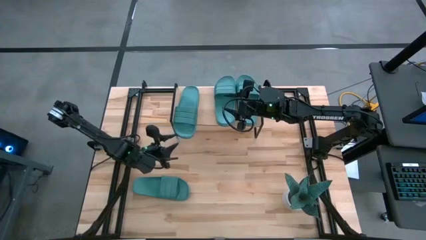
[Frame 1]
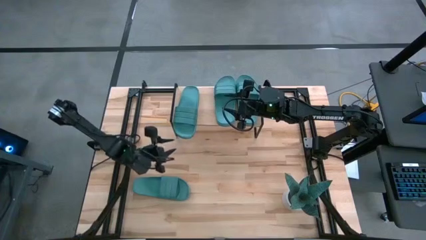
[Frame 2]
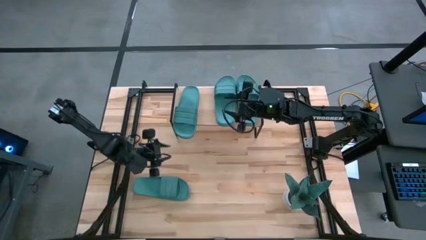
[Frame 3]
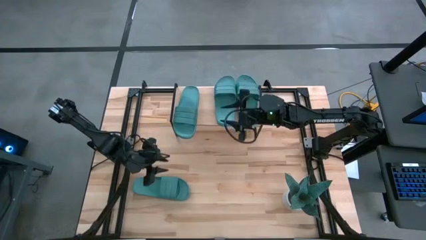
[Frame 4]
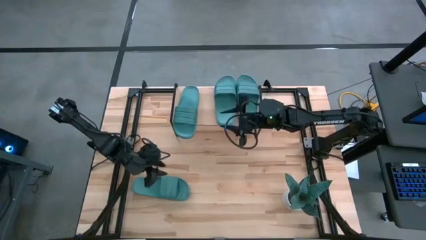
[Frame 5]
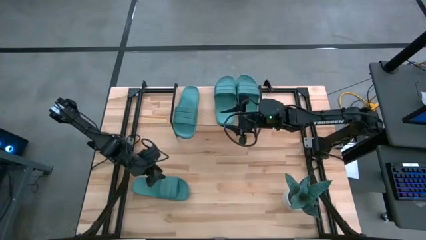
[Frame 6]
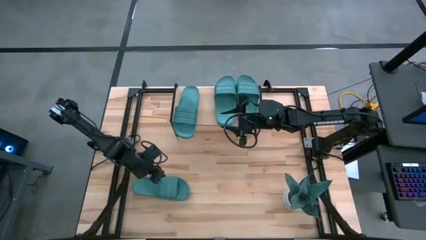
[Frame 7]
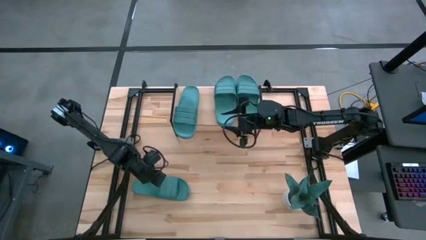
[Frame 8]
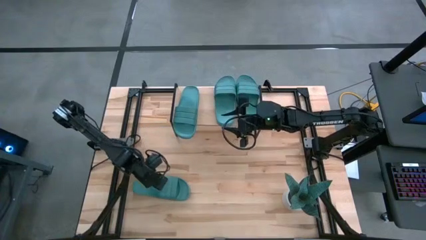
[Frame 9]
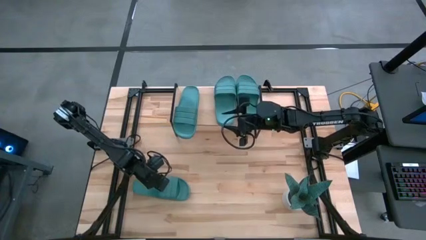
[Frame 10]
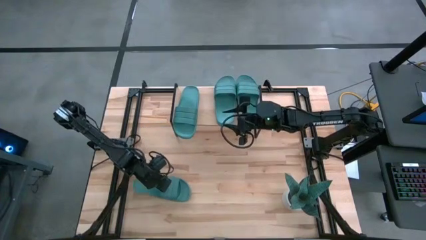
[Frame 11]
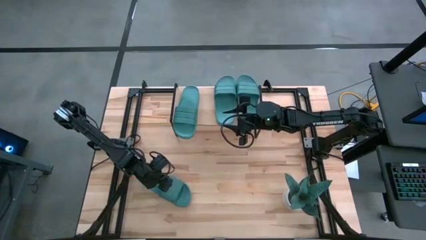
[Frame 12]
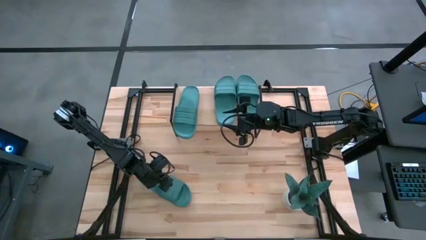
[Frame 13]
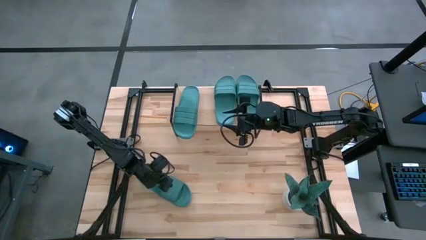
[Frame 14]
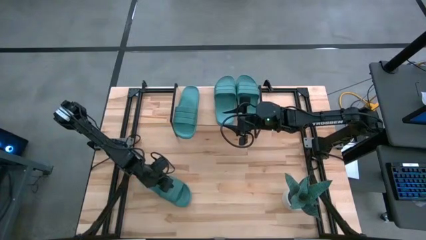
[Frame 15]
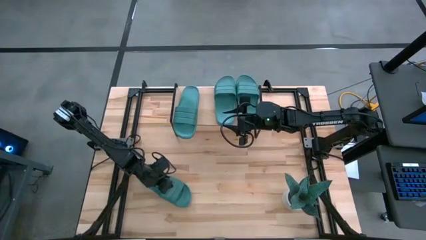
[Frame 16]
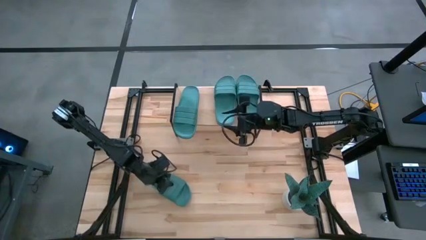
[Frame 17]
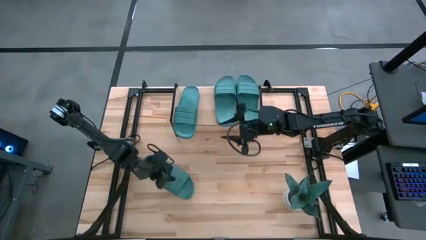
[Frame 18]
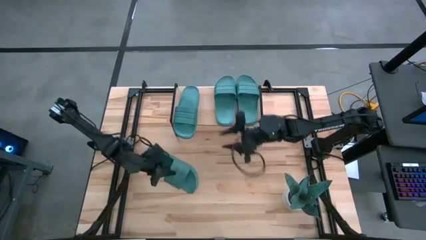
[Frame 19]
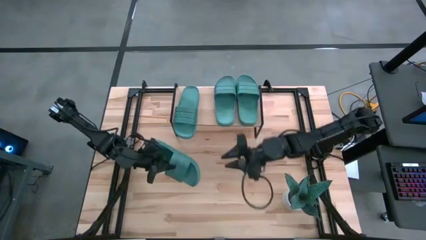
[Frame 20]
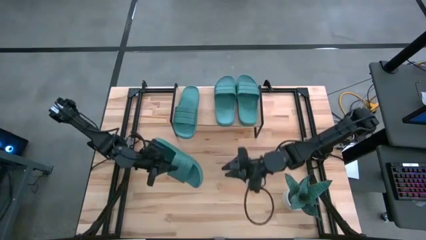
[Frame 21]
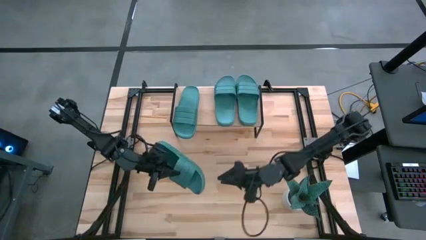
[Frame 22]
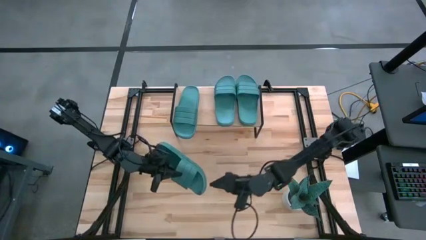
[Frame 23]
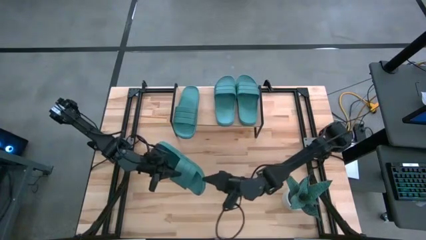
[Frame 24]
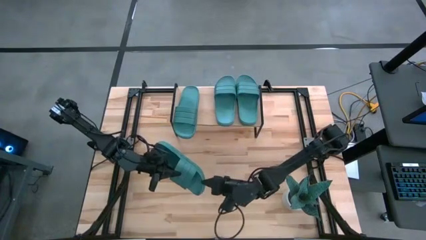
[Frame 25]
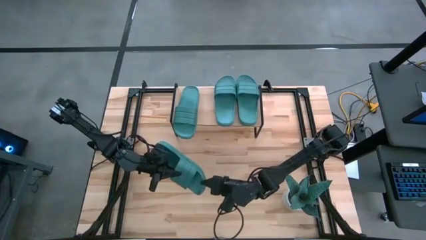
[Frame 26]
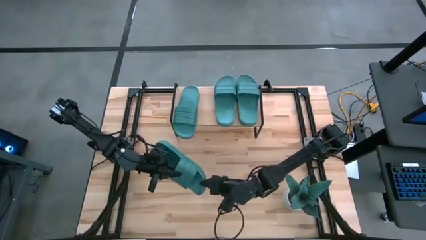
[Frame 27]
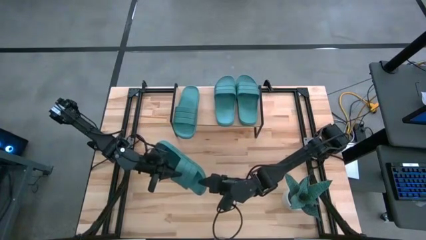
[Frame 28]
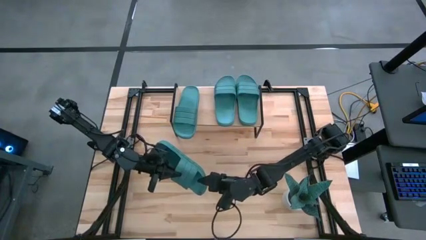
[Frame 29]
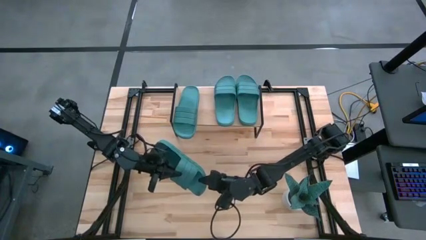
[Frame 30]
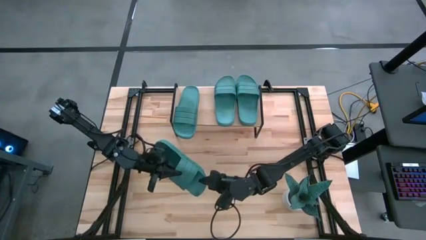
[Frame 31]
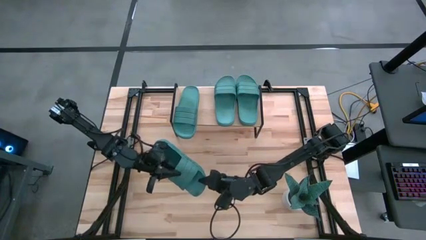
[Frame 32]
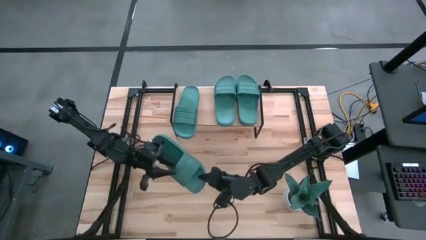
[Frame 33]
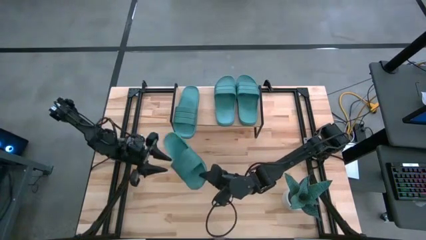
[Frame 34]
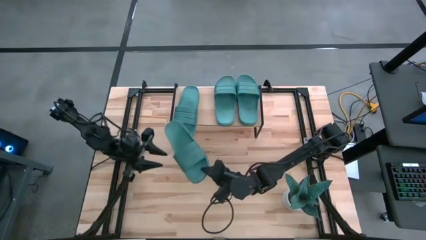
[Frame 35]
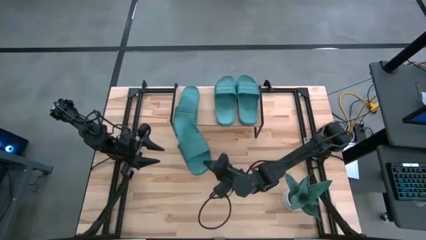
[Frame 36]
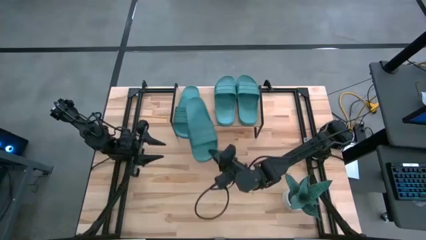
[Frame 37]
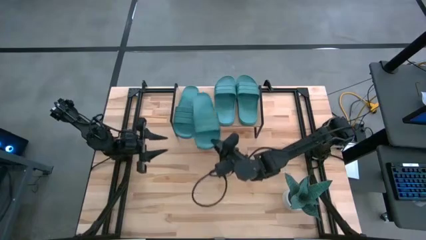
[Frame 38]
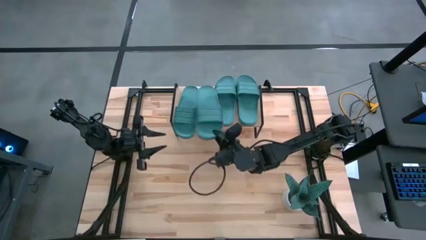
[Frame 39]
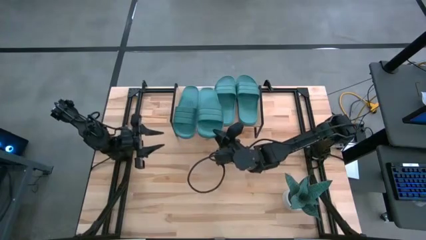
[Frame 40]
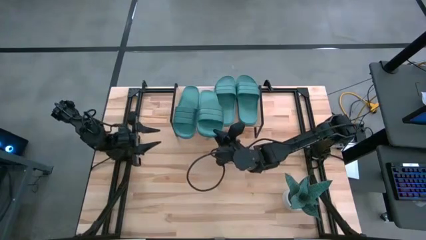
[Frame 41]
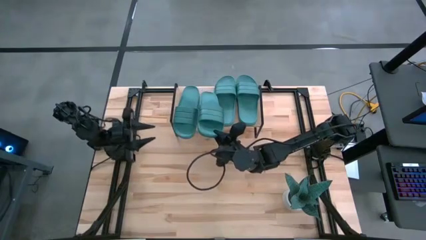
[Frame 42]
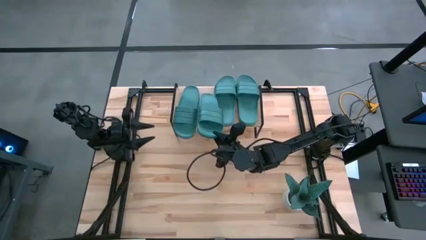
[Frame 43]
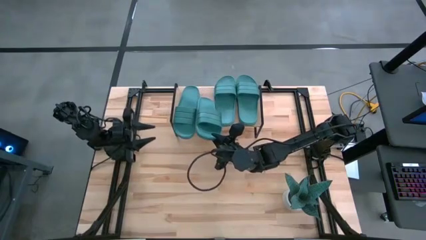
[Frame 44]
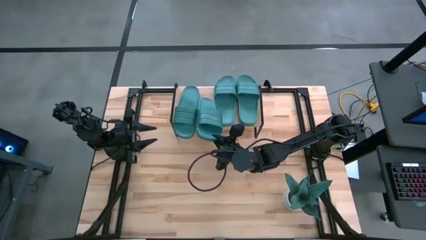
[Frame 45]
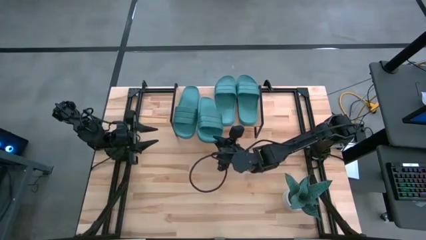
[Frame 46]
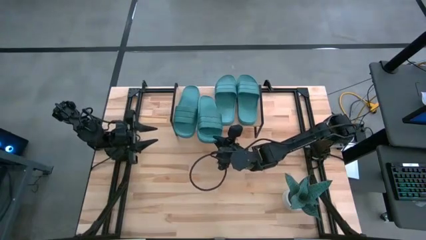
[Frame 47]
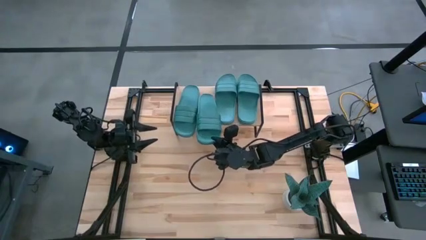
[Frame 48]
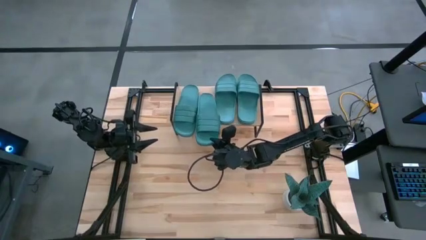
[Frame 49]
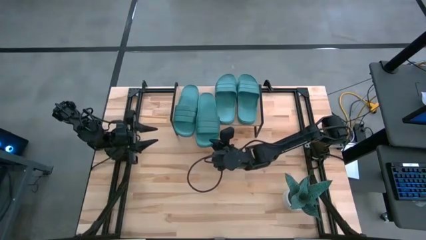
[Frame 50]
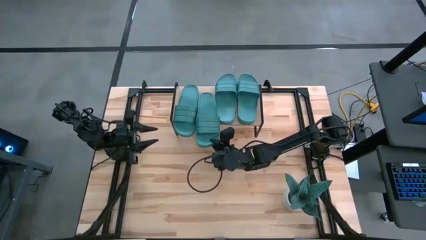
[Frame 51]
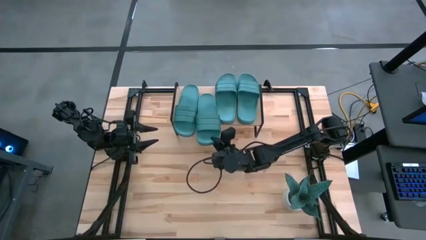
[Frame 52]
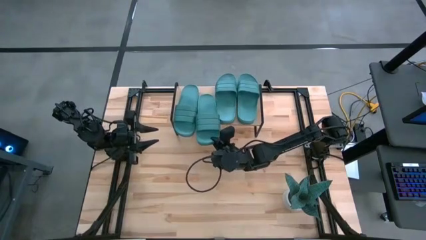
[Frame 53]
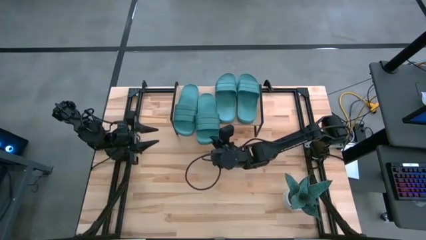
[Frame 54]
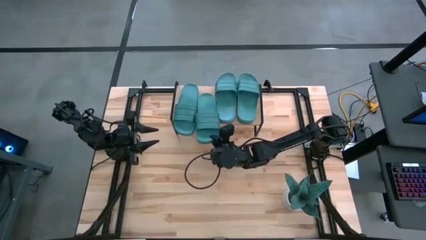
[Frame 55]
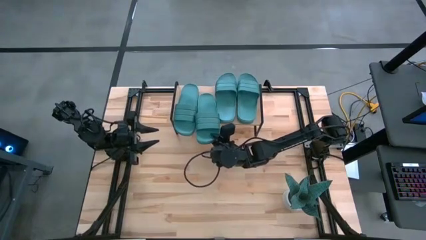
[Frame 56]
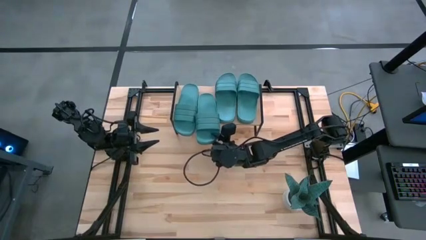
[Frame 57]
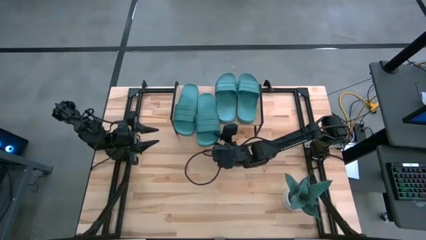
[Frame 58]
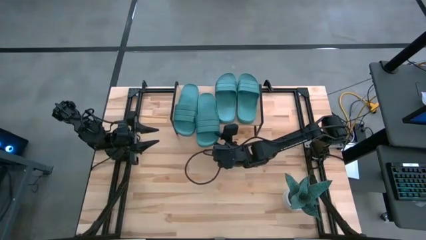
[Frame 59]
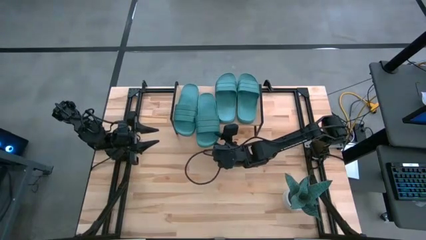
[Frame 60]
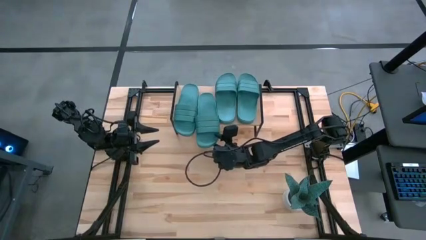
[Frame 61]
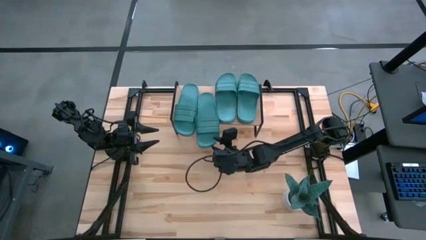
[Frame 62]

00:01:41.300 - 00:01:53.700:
Task: Pick and place slides into the shelf
Put the green slides on the shelf
